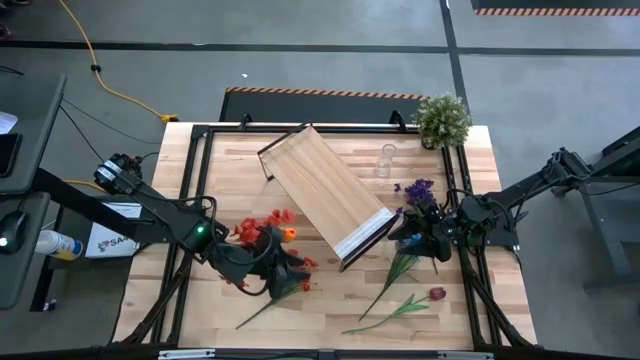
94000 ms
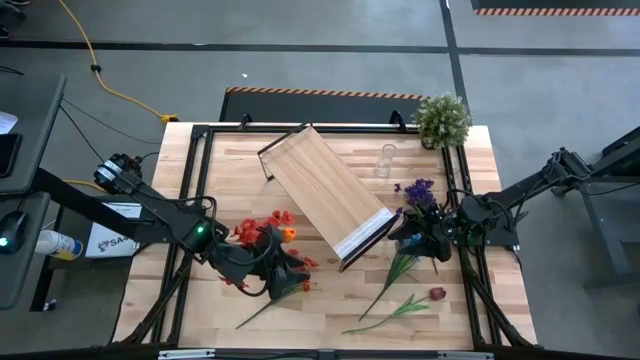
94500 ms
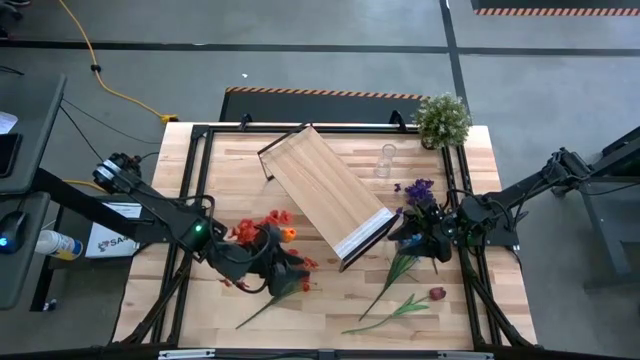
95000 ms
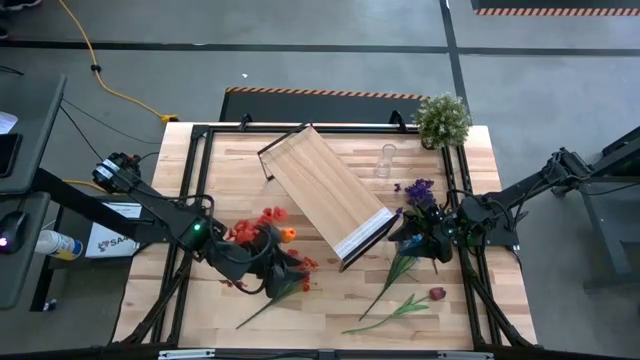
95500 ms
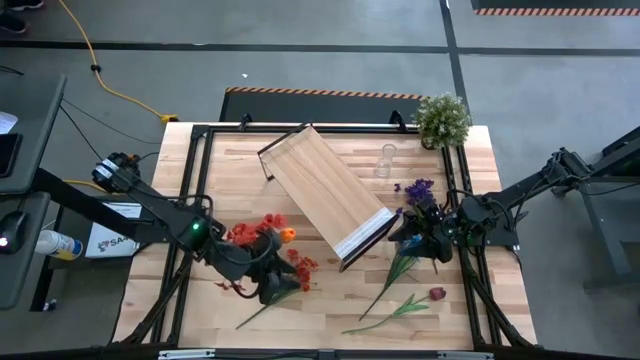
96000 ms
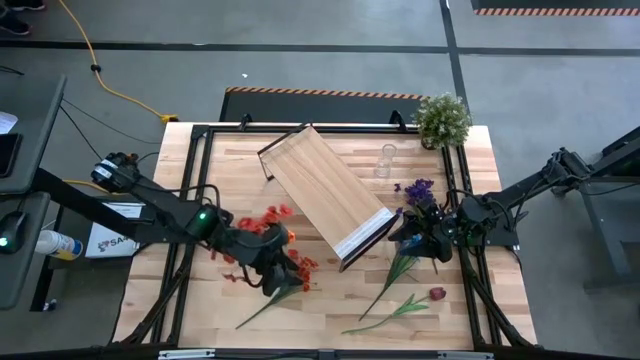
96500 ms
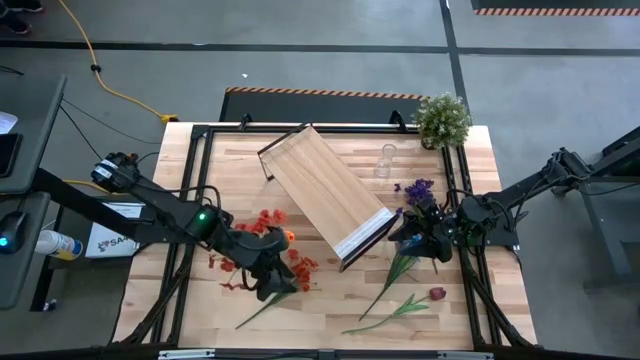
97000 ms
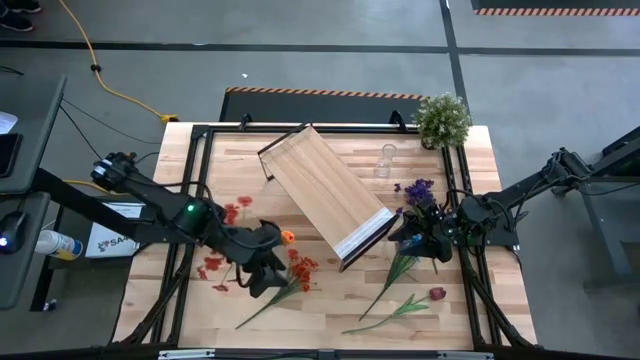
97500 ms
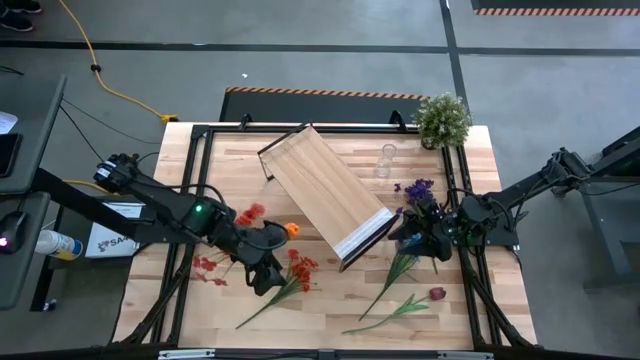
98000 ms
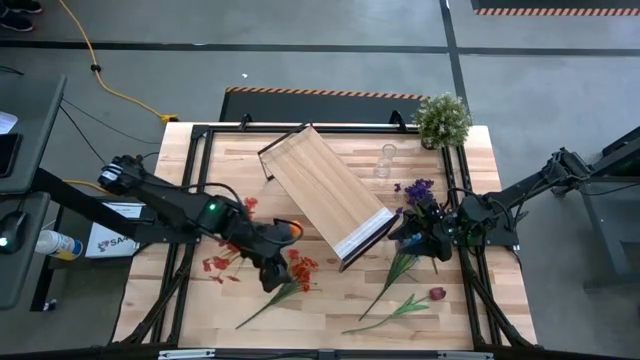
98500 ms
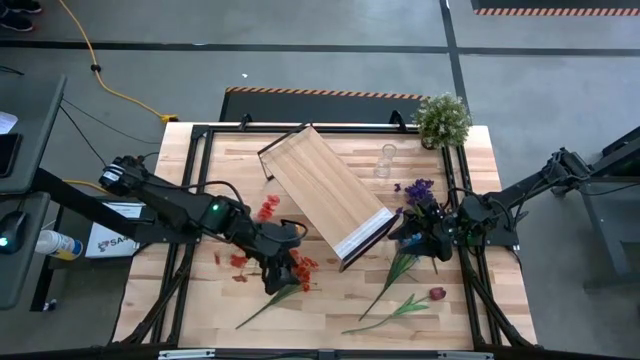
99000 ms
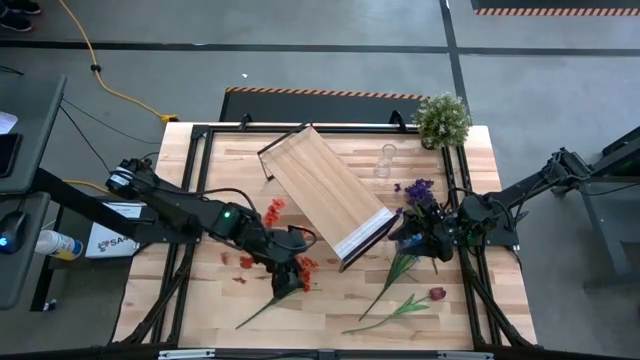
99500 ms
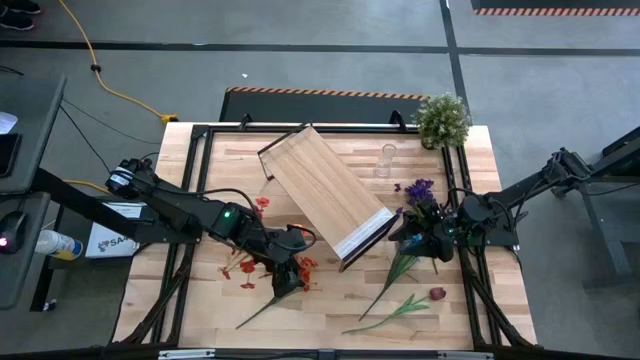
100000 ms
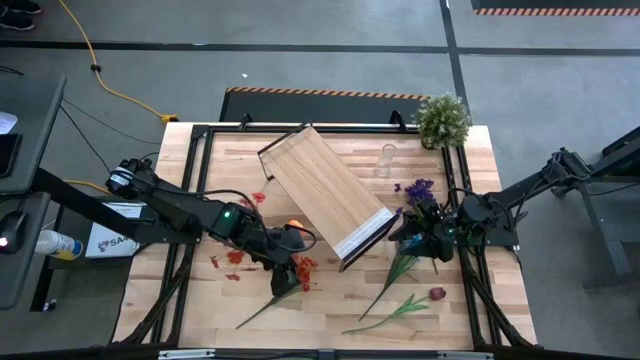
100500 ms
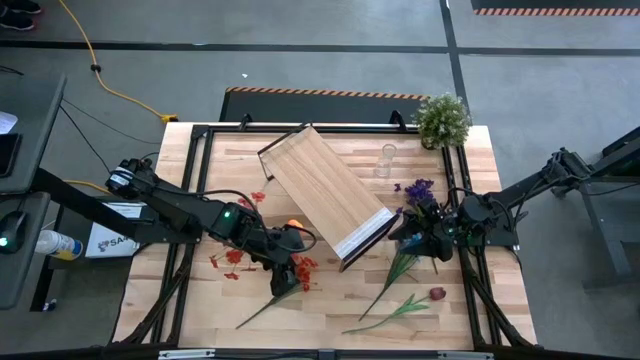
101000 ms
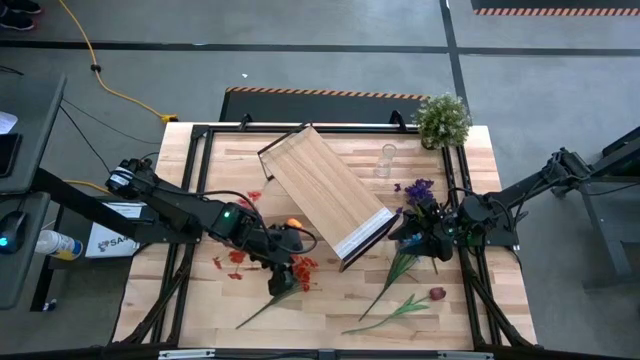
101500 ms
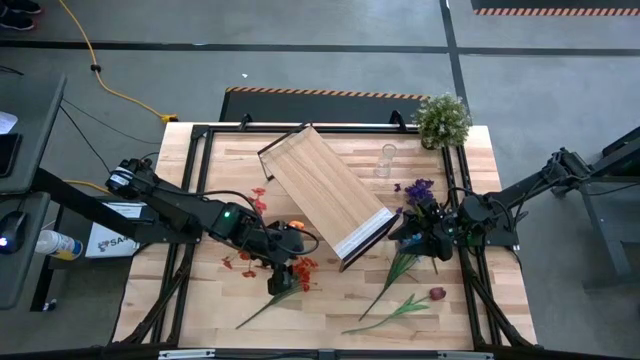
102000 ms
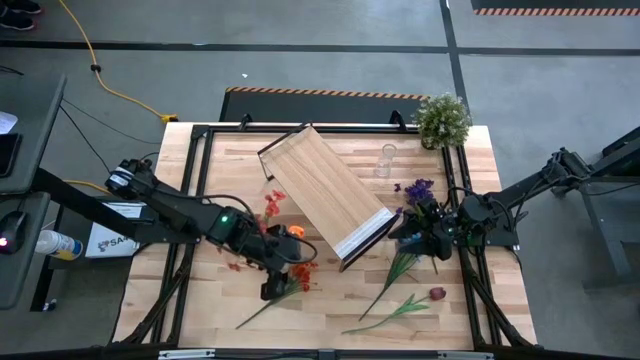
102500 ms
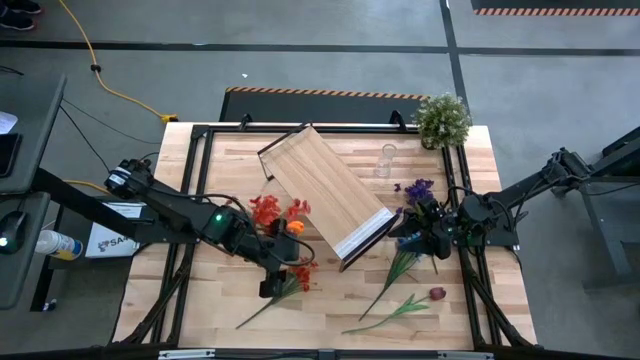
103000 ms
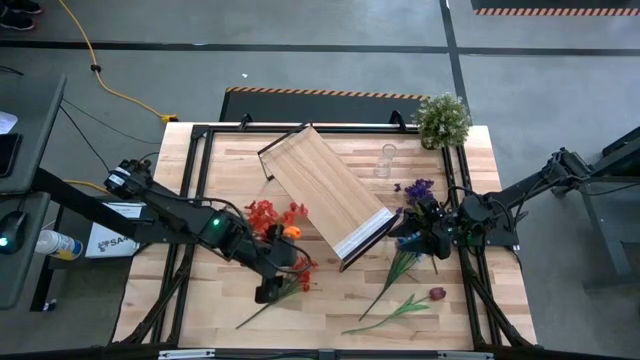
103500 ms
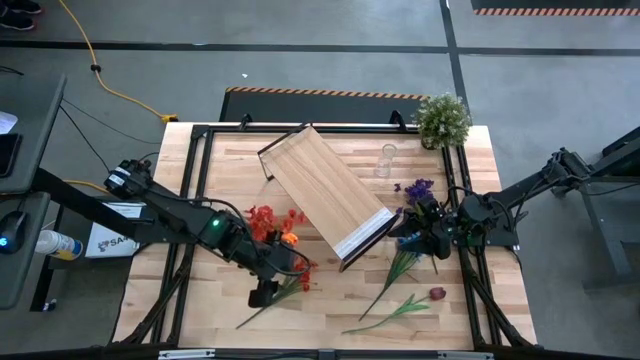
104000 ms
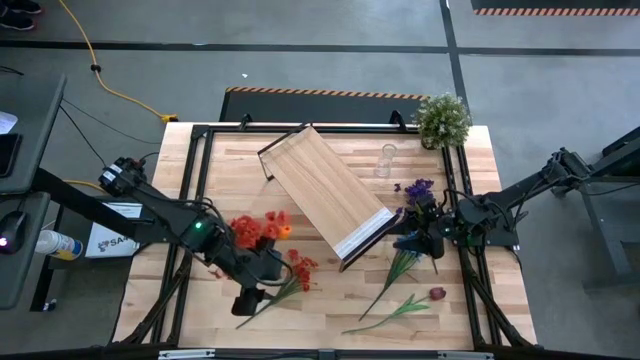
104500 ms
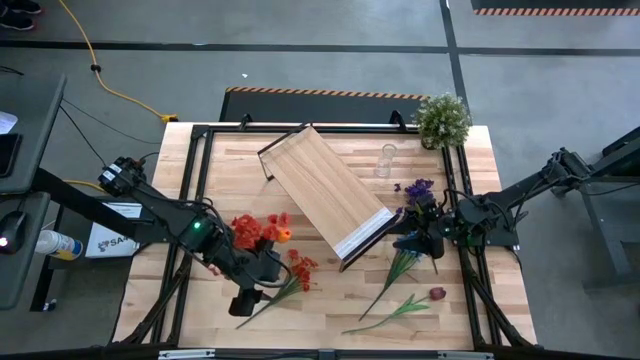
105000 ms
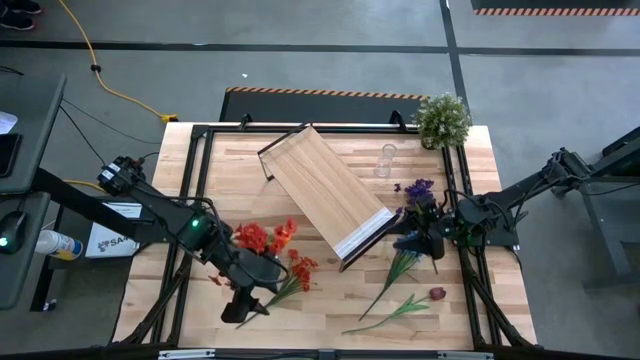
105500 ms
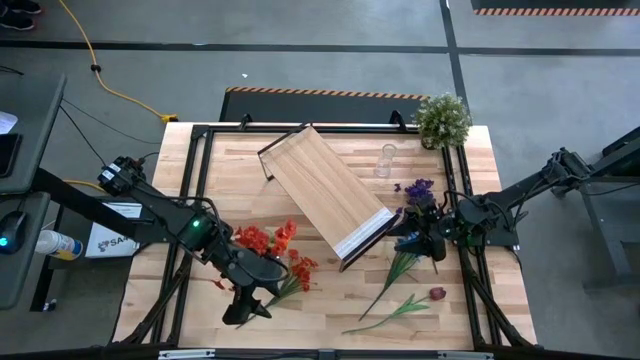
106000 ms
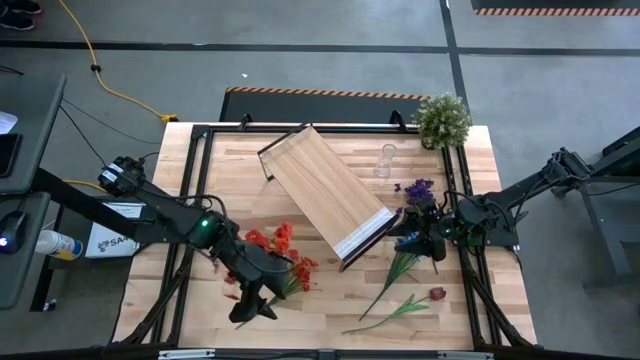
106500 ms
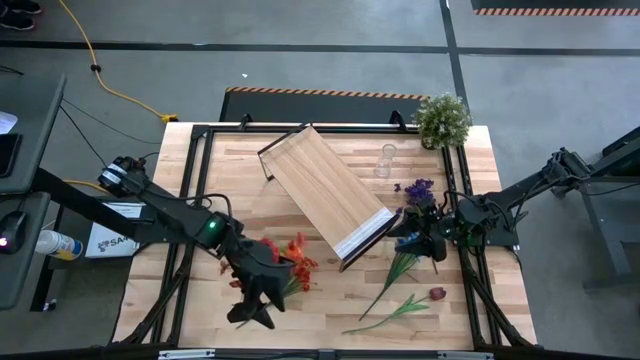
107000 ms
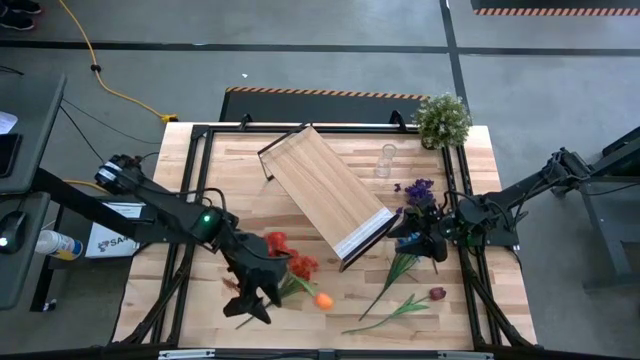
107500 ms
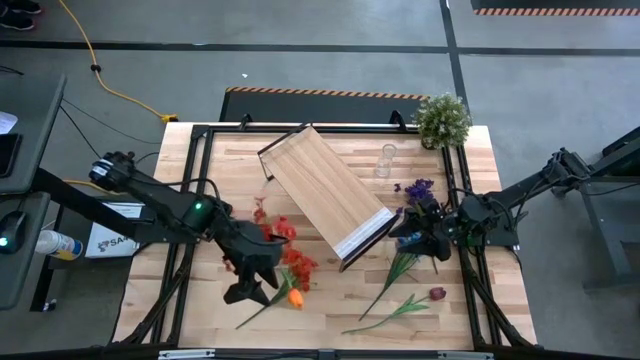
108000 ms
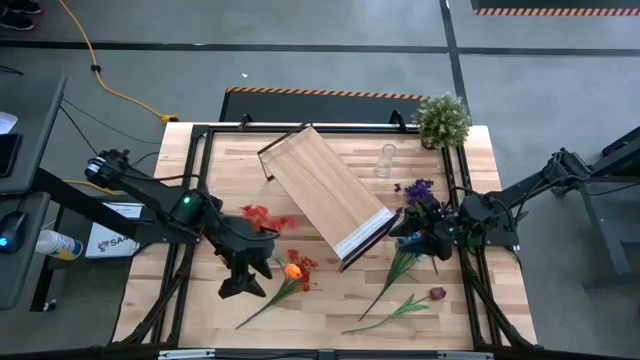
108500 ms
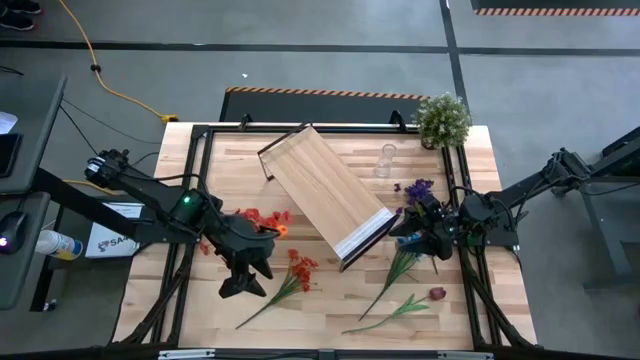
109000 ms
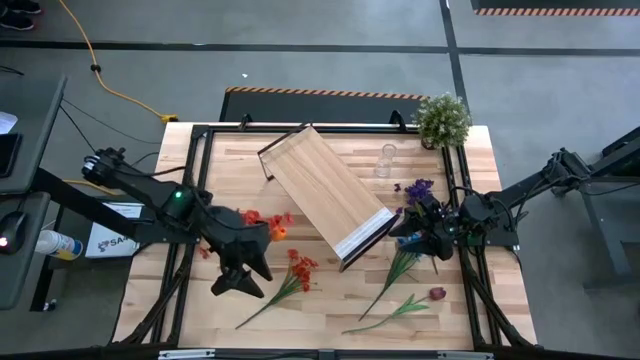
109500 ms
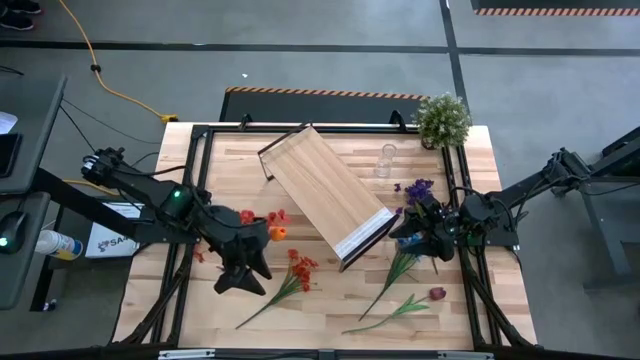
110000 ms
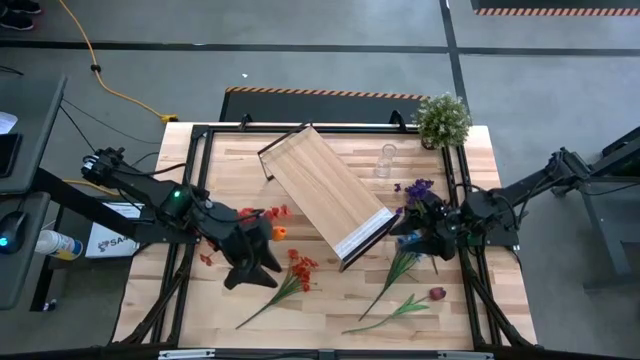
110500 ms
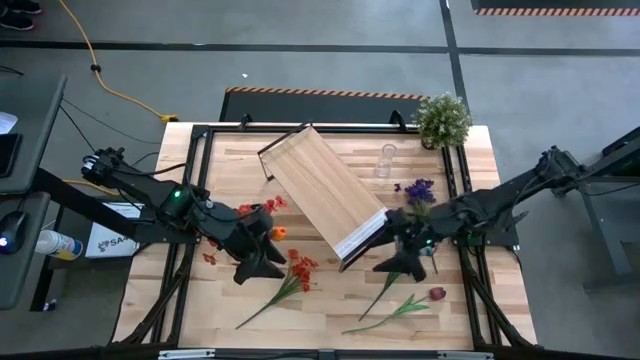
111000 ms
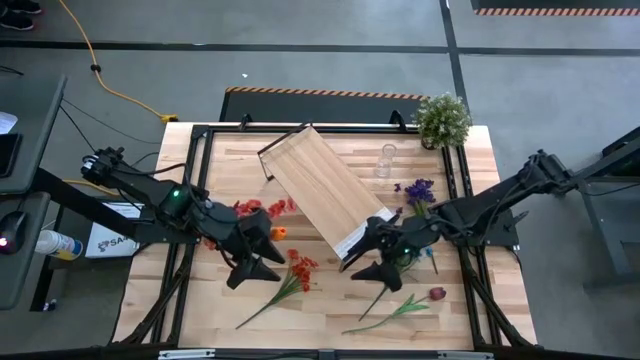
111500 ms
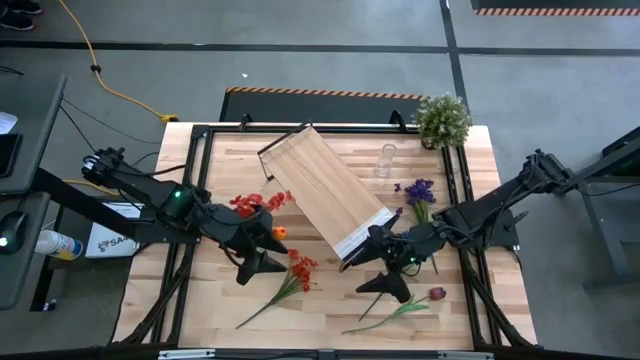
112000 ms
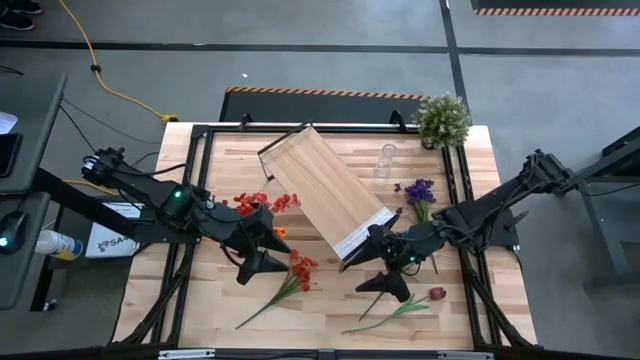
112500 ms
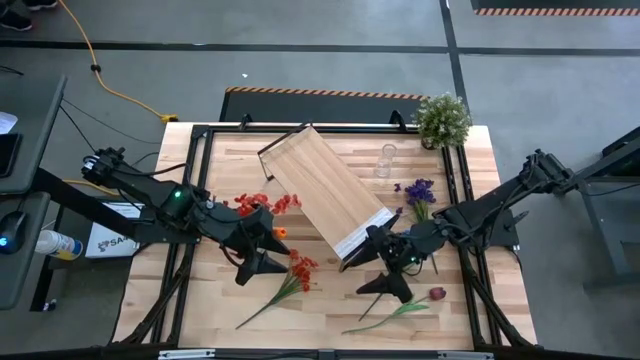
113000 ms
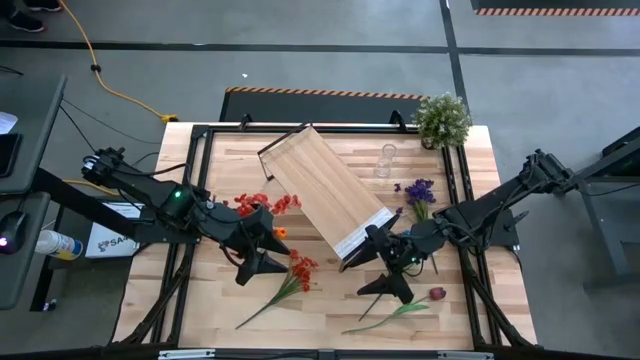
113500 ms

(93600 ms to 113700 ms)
Task: Pick and place flowers into a vace then onto a shelf
Put the red flowers into the bottom transparent vase

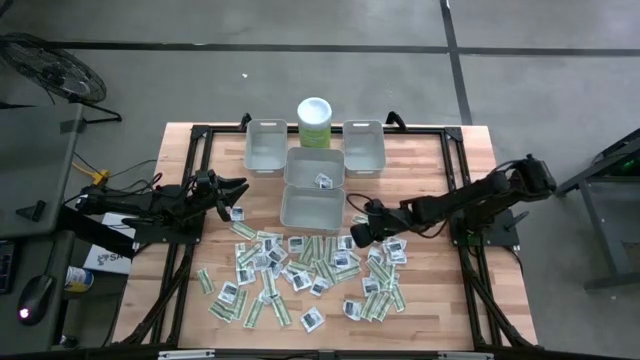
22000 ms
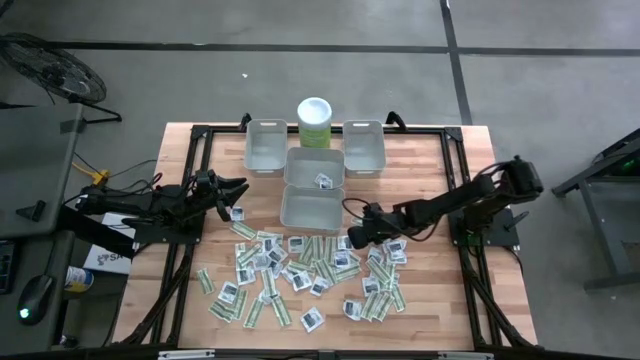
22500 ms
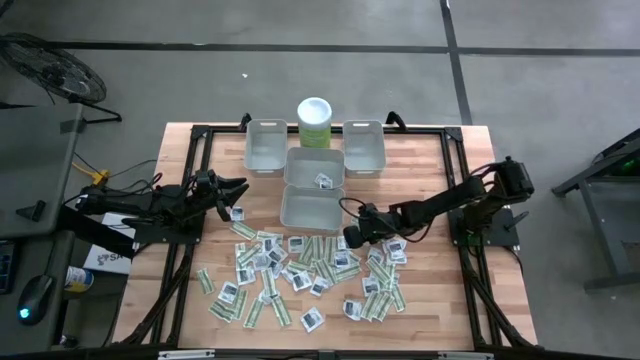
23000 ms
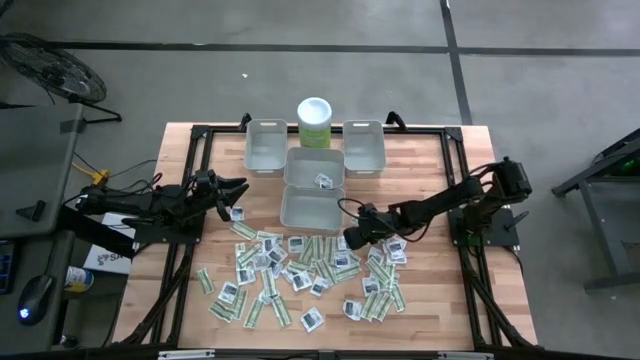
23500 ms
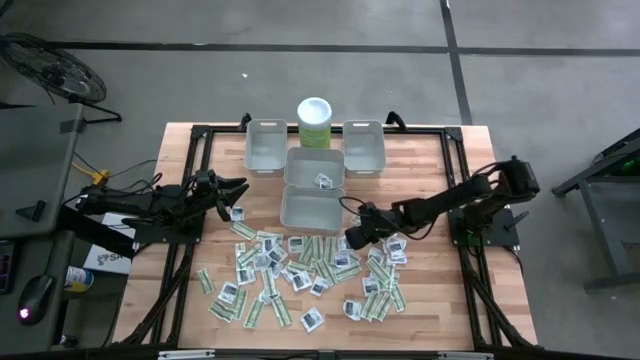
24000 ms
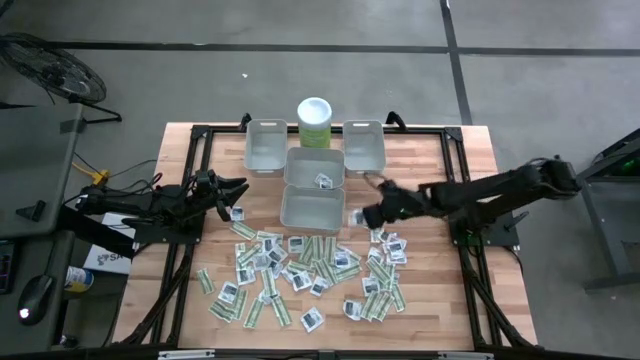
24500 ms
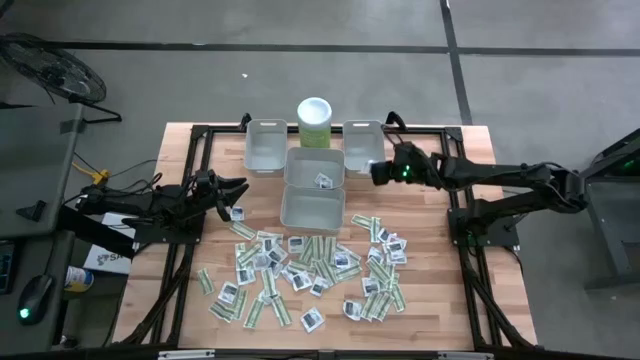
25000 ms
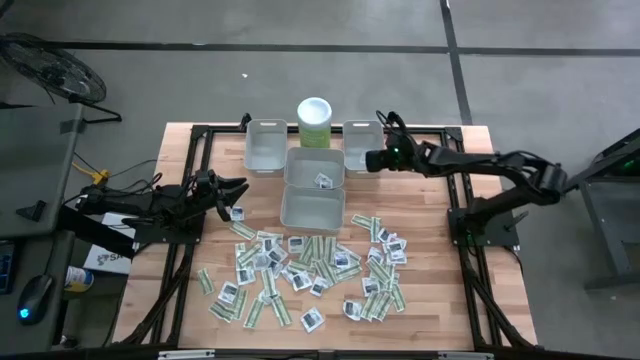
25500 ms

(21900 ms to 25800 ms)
Task: Pick & Place First Aid Supplies
Put the towelette pack into the right bin
